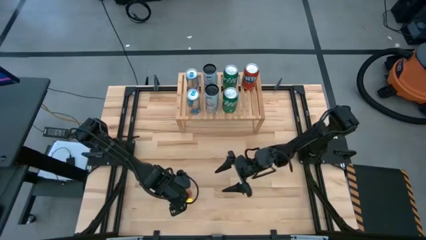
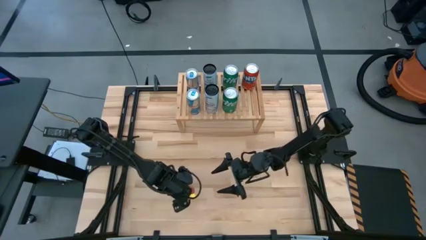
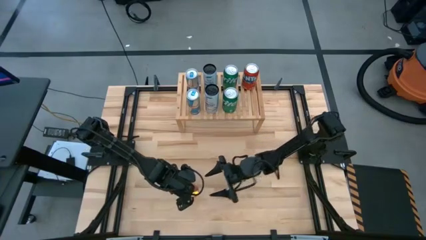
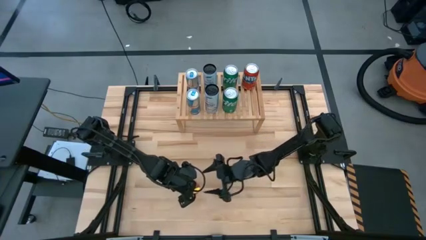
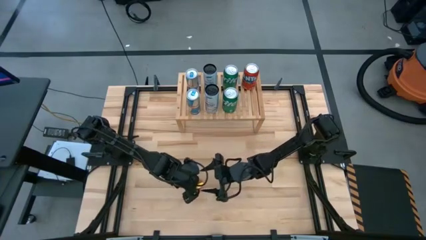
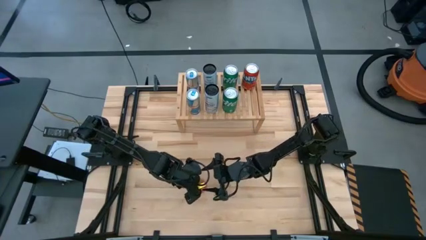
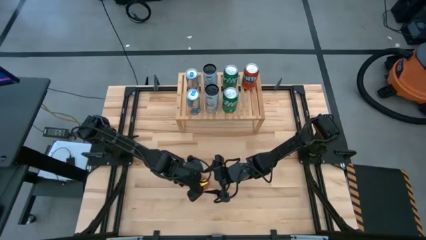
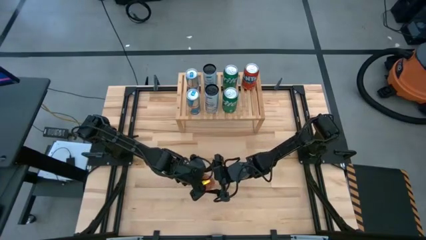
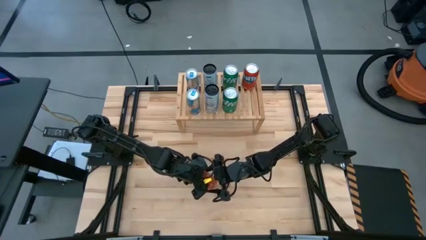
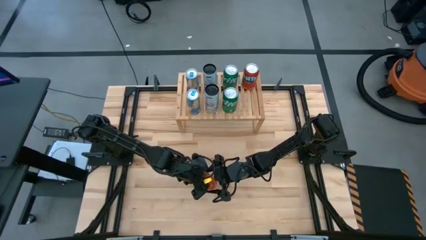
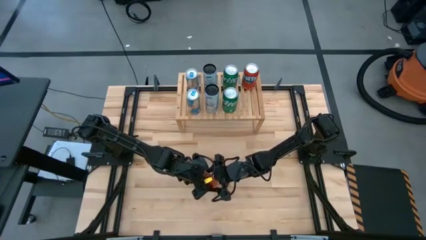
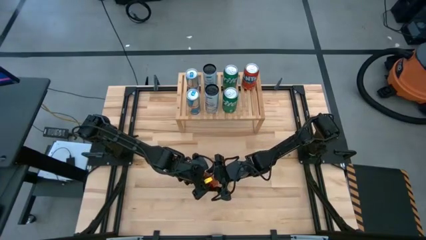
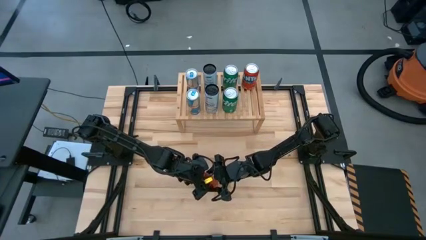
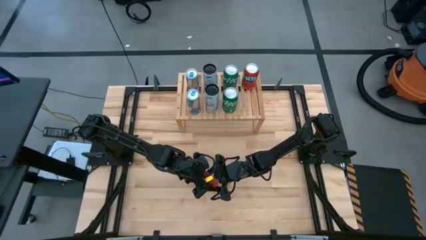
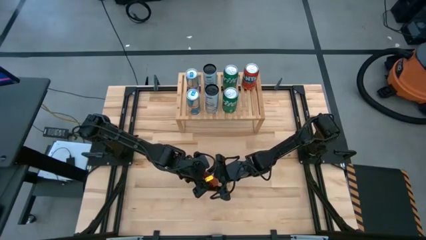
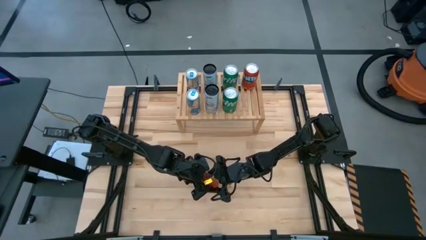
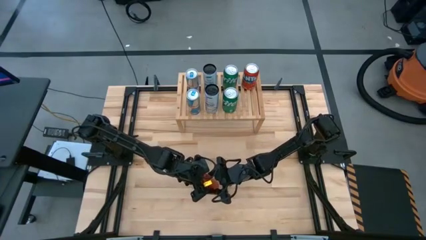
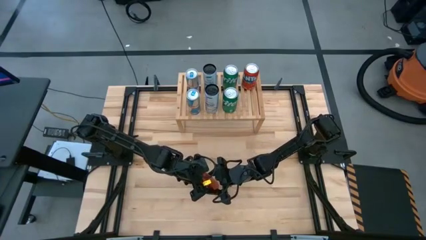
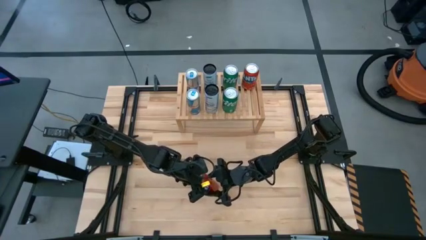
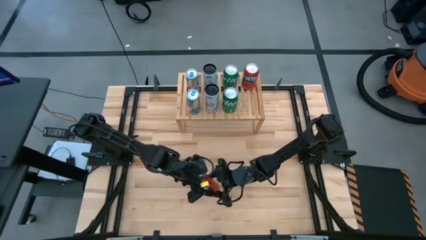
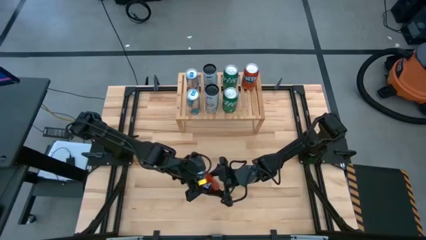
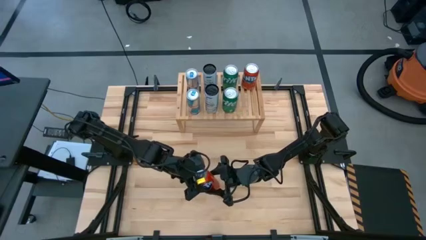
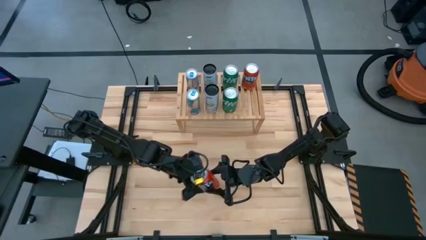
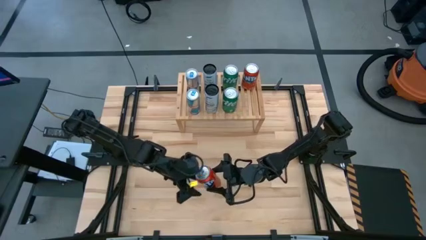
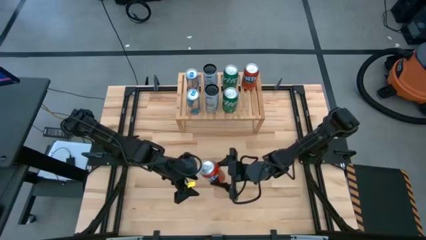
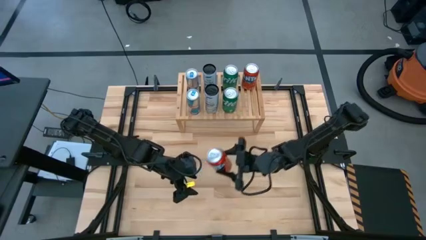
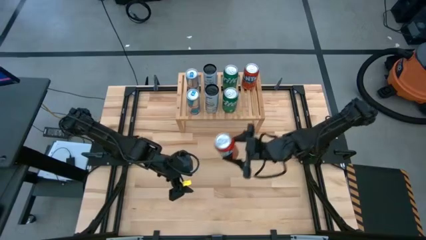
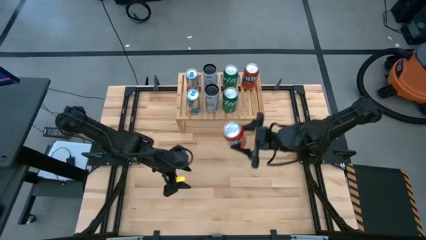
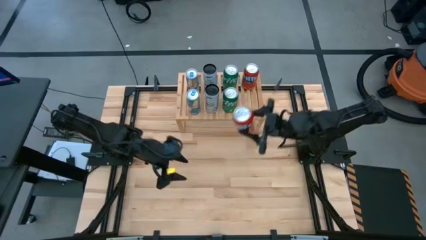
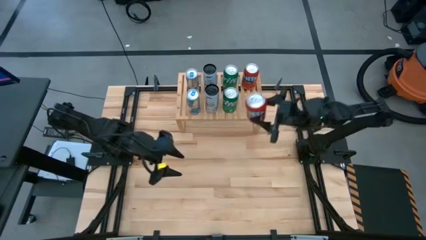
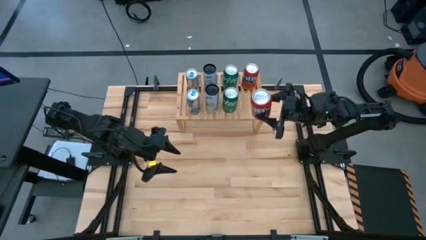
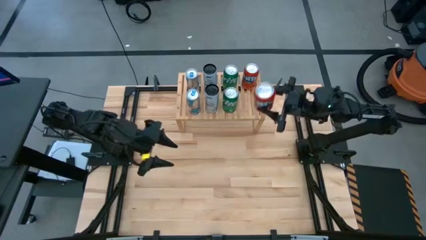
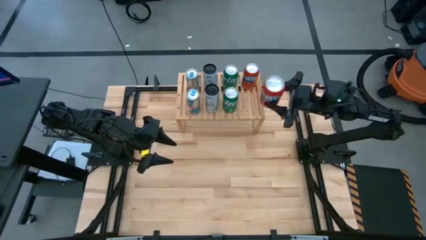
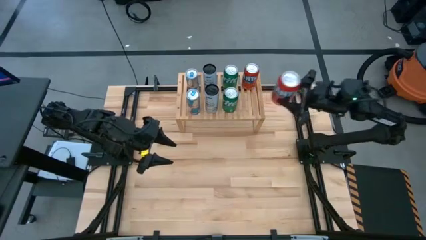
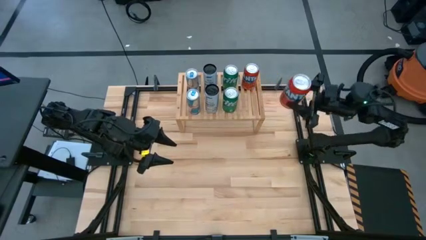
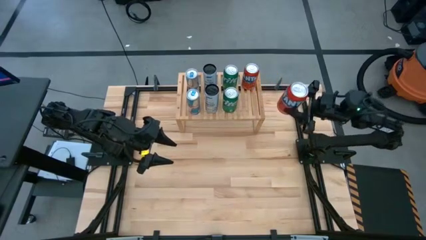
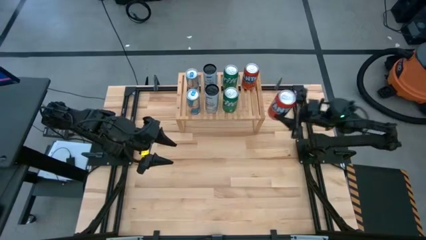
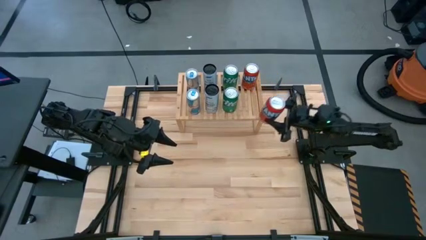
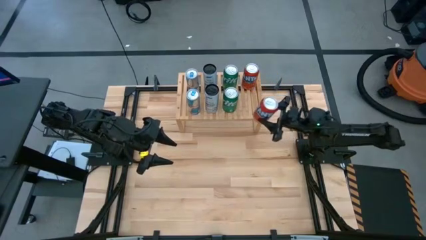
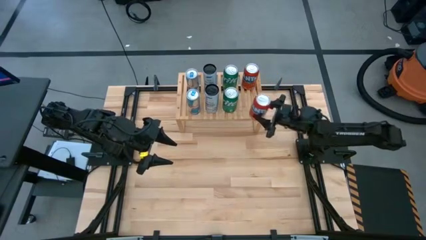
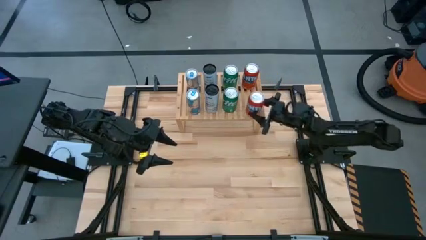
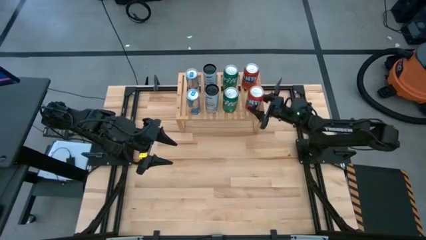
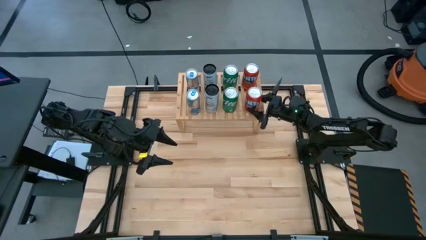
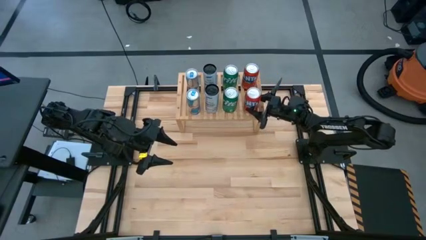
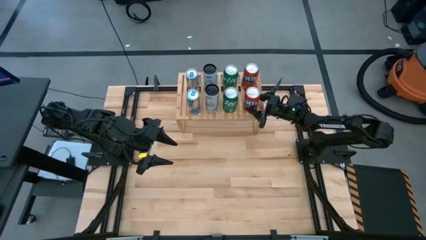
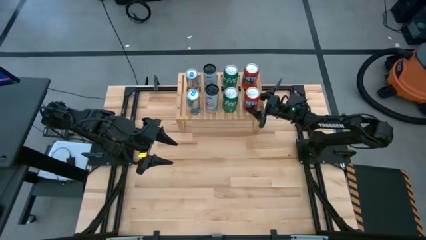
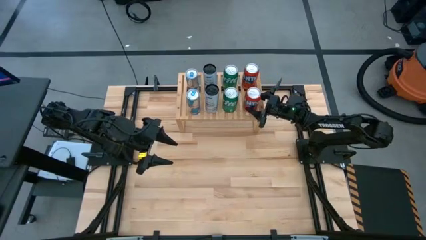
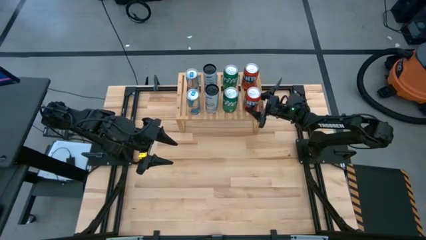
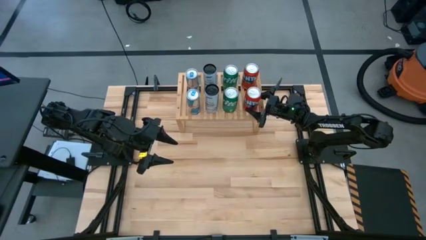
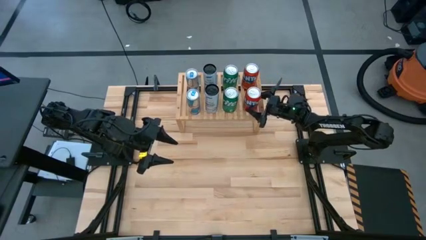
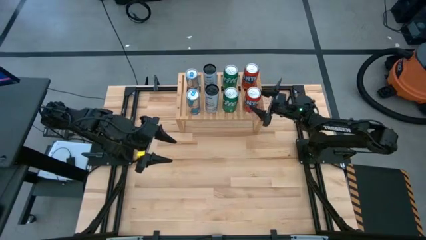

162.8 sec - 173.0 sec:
Task: Place canned beverage on shelf
Put the red soda can aligned with the other red soda can on the shelf
